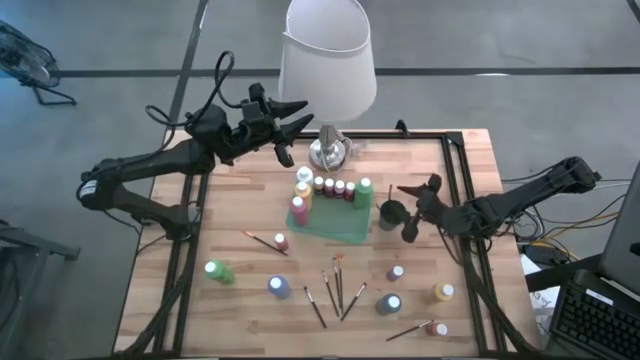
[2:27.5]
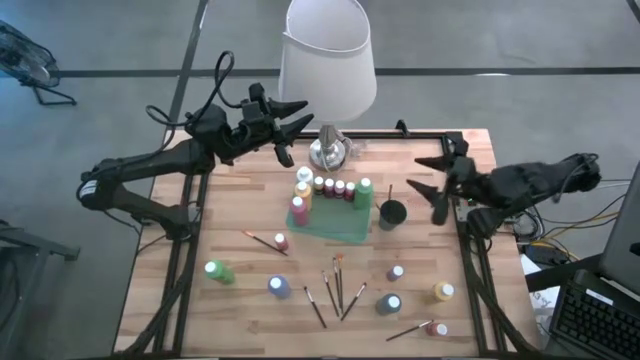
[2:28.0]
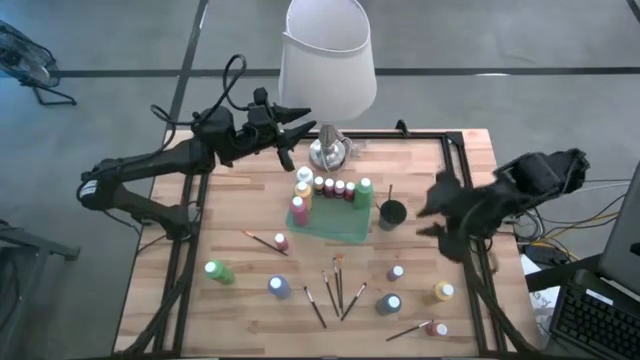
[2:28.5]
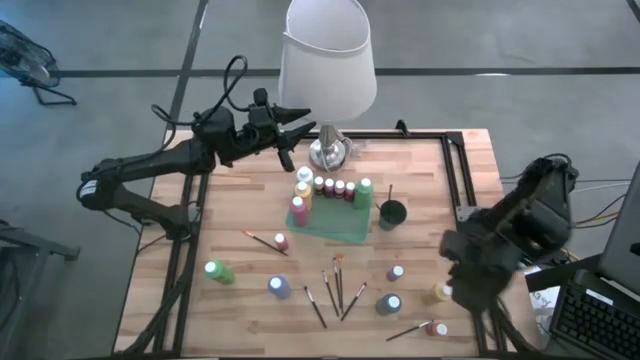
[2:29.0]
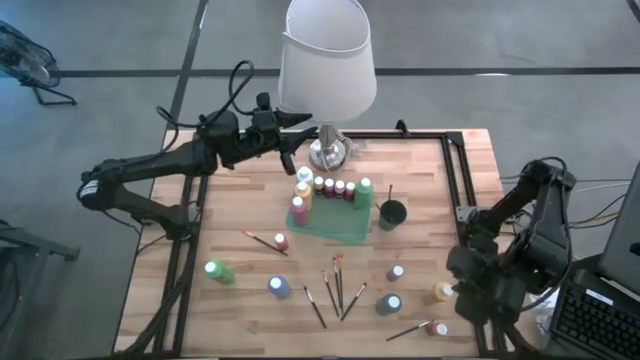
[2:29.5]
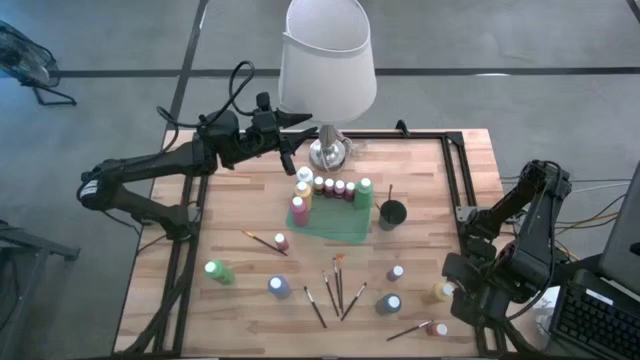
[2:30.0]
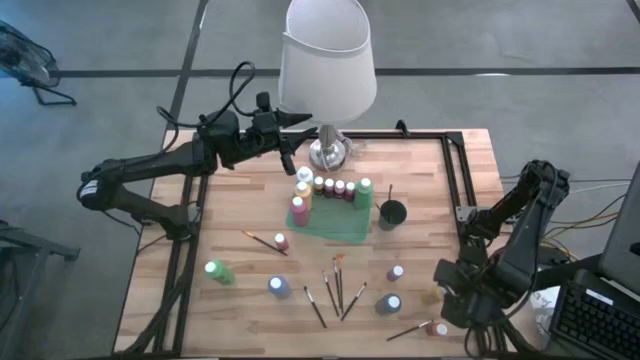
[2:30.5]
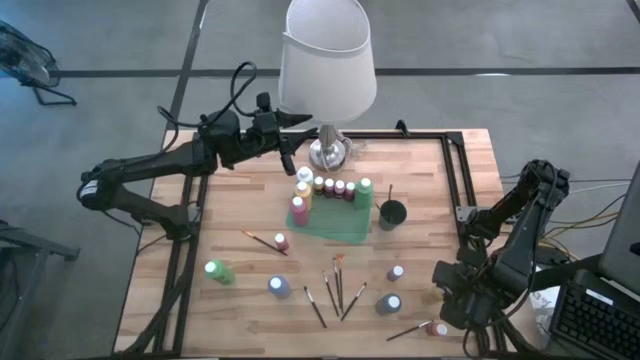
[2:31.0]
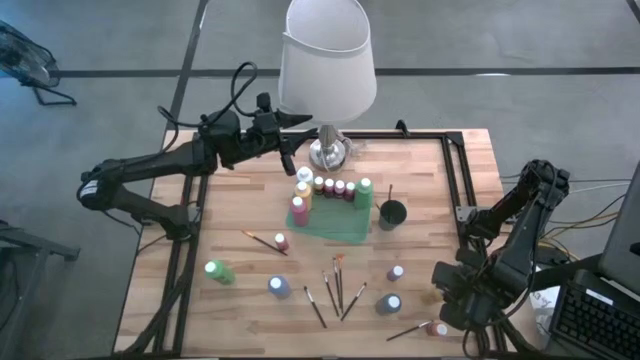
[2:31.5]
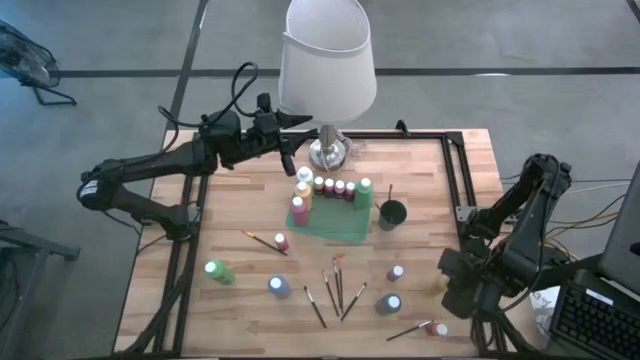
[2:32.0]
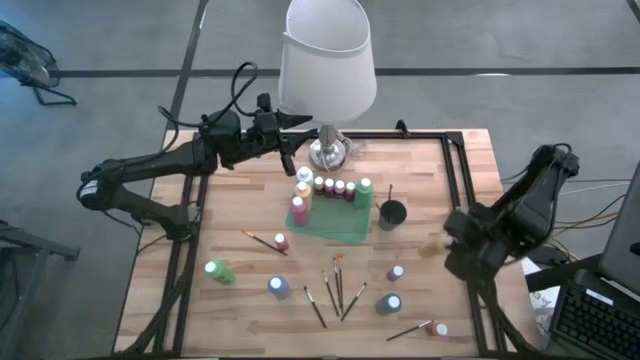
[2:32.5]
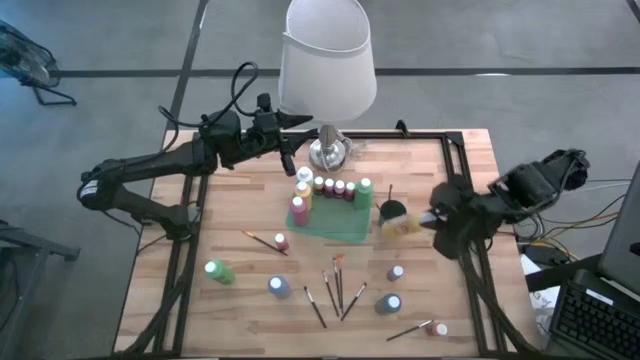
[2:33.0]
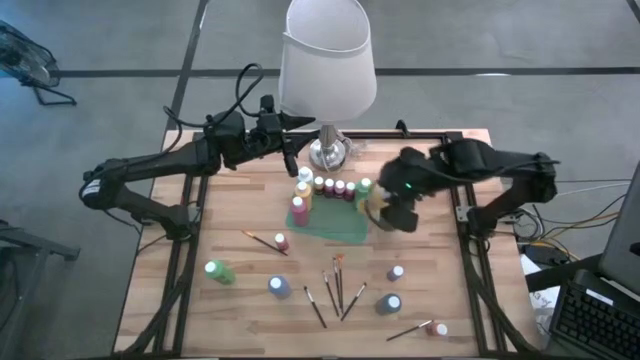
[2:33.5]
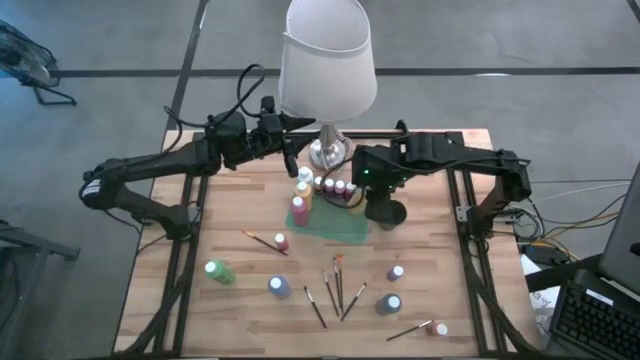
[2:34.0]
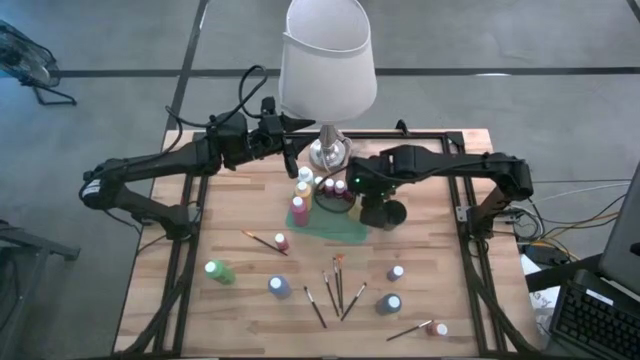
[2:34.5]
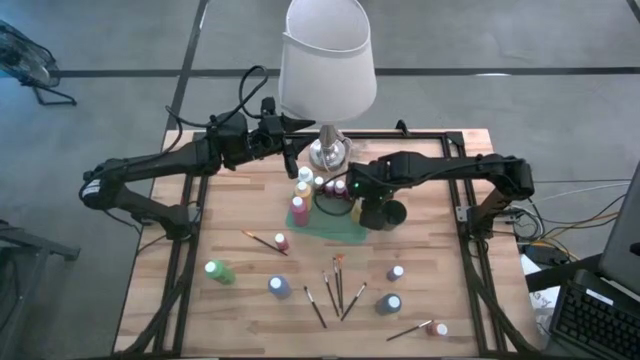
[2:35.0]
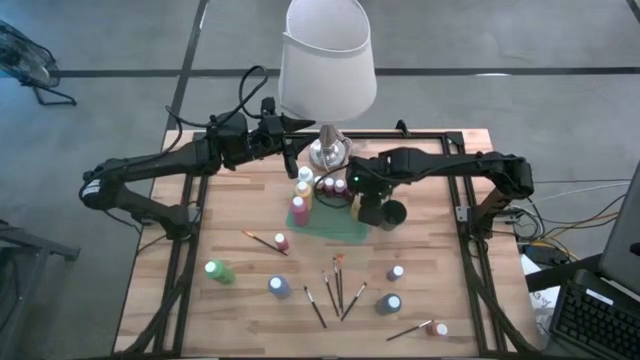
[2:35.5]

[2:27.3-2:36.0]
Task: Pick & Place Paint Supplies
Put the yellow paint bottle into the green bin

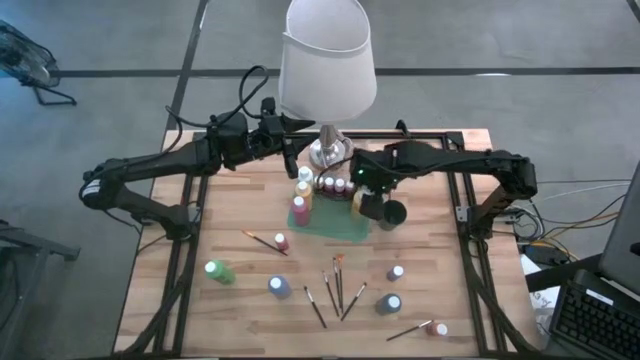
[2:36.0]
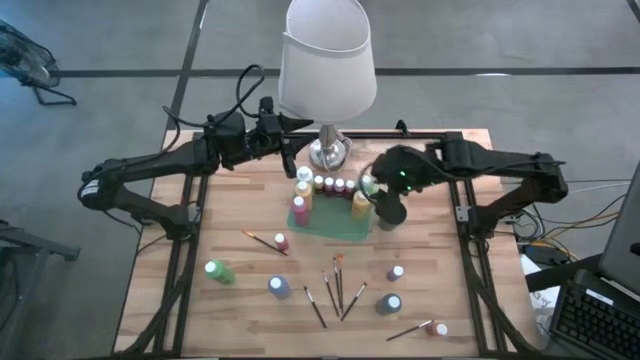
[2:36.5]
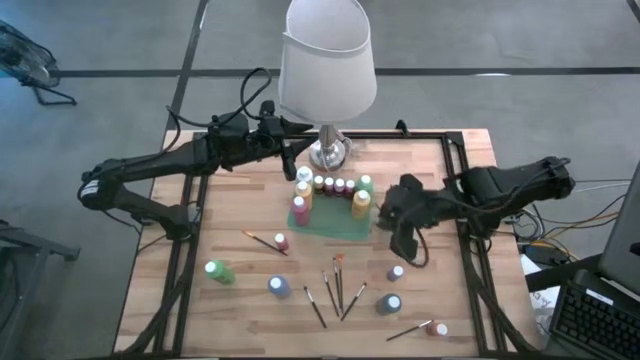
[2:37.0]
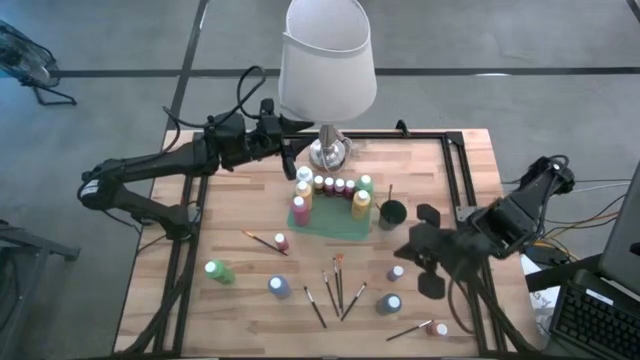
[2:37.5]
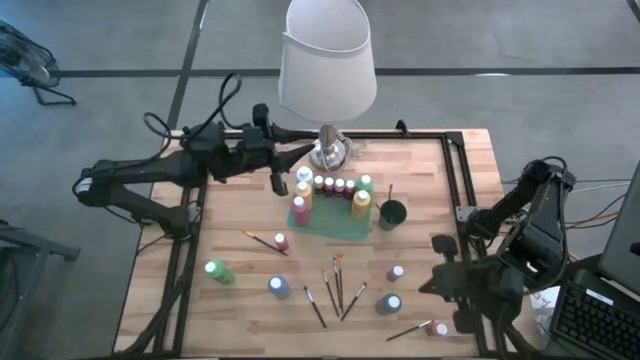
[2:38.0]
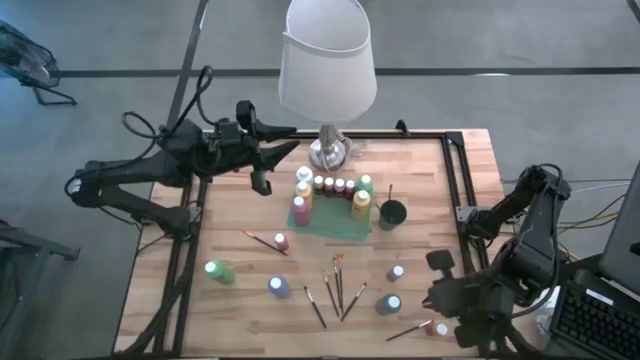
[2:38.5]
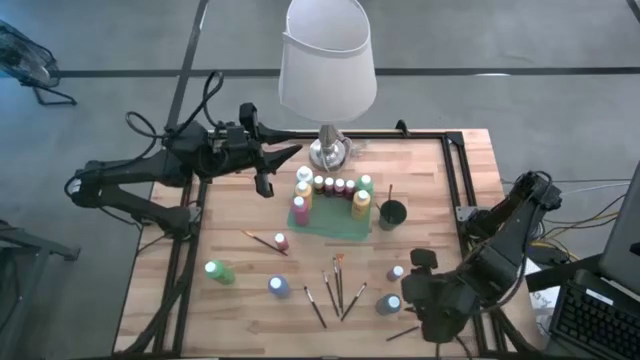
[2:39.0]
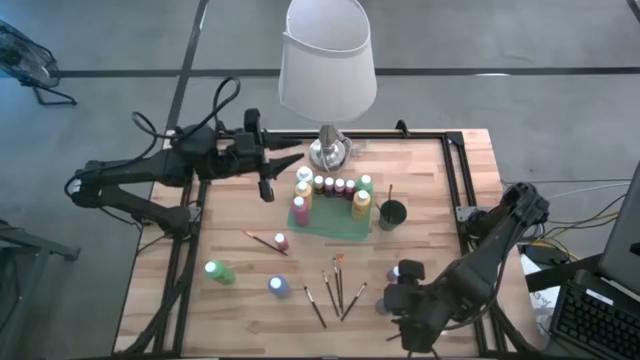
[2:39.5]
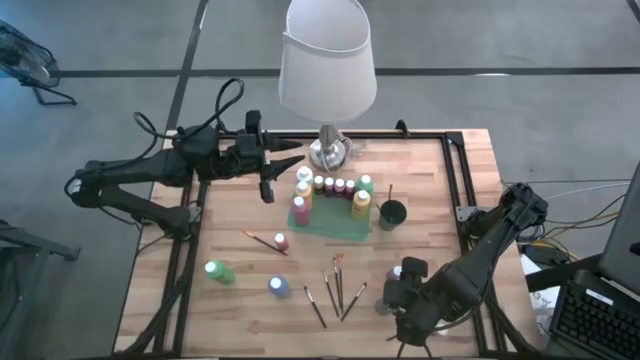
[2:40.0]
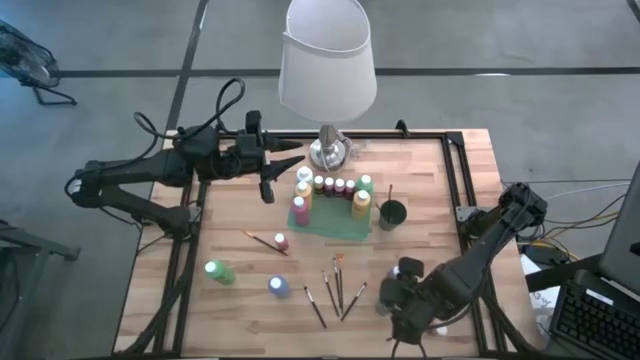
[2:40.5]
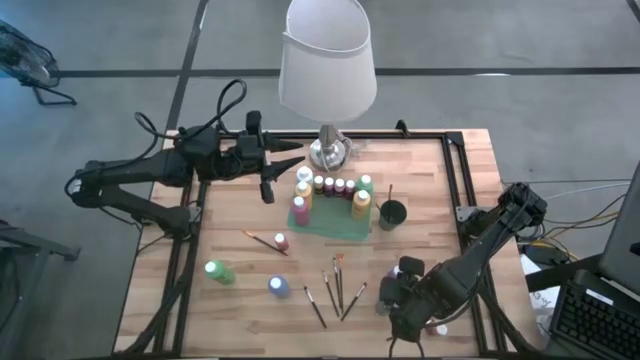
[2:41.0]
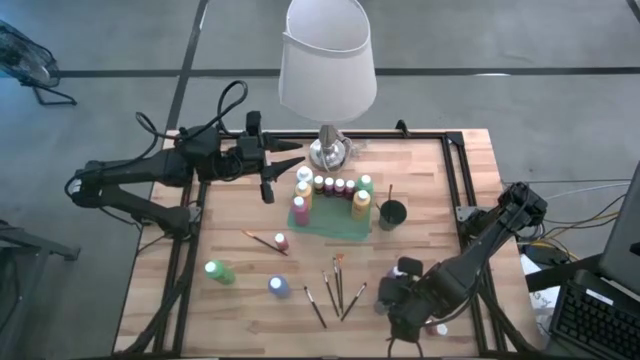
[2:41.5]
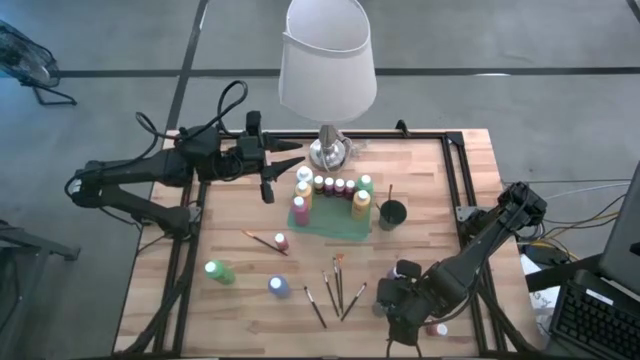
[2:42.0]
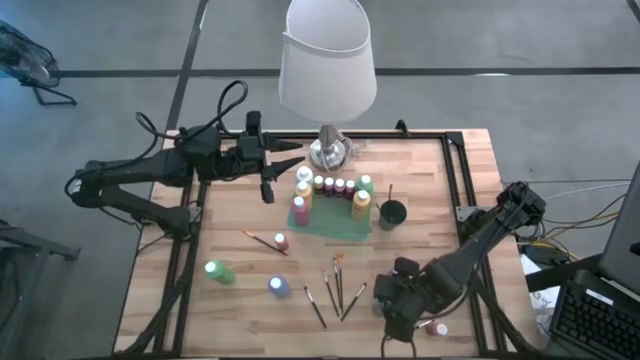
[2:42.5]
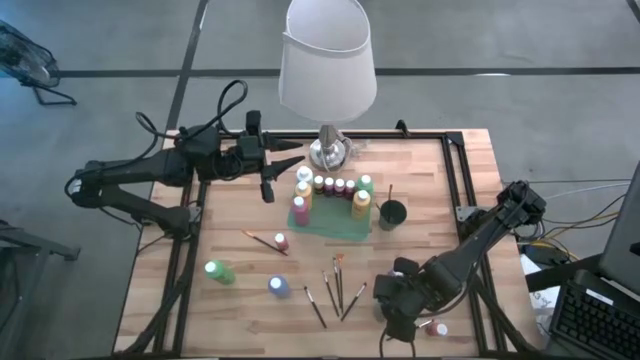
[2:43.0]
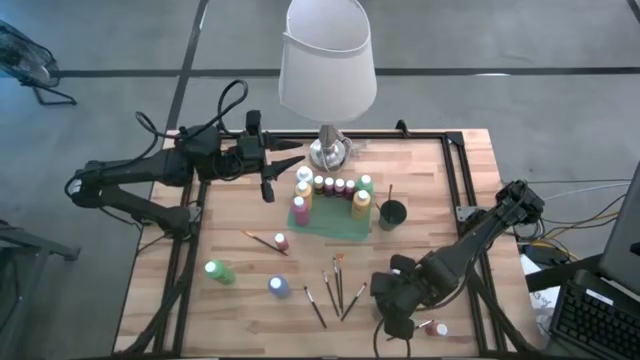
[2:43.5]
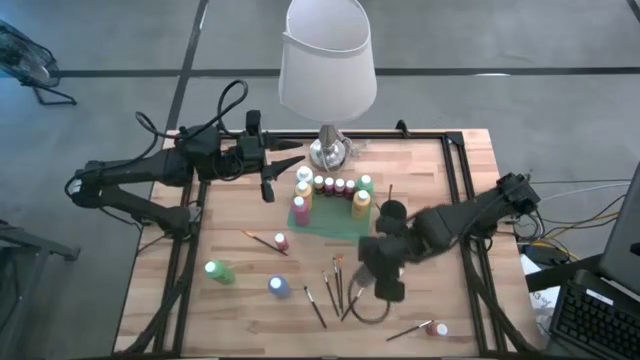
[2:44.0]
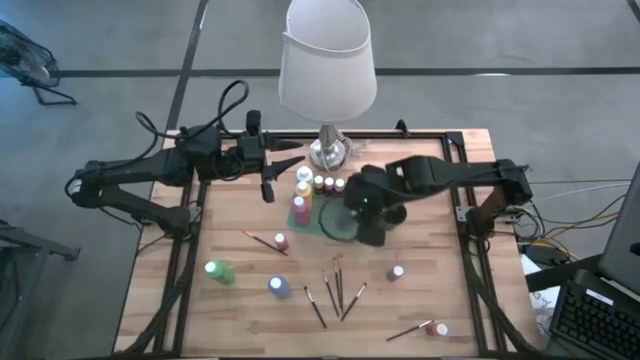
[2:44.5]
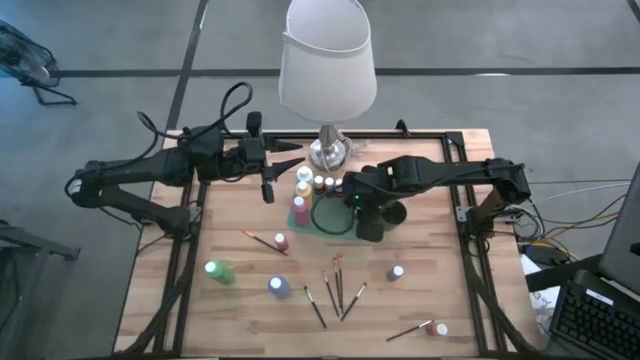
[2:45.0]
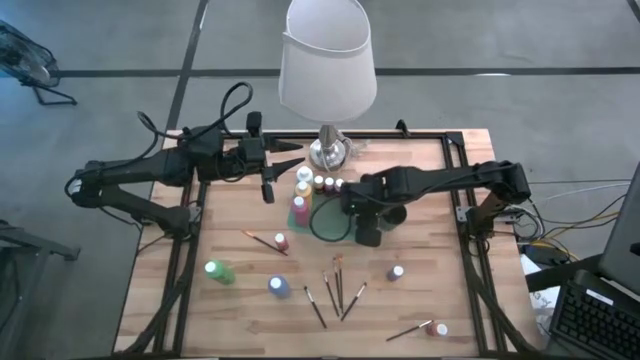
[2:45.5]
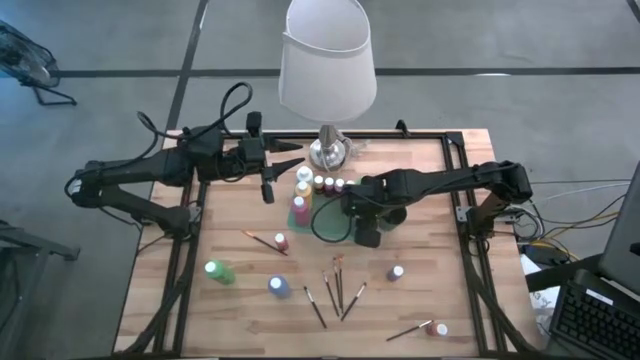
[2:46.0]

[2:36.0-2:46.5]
Put the blue paint bottle into the green bin

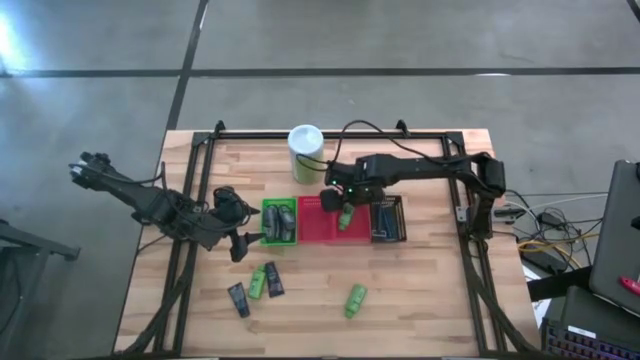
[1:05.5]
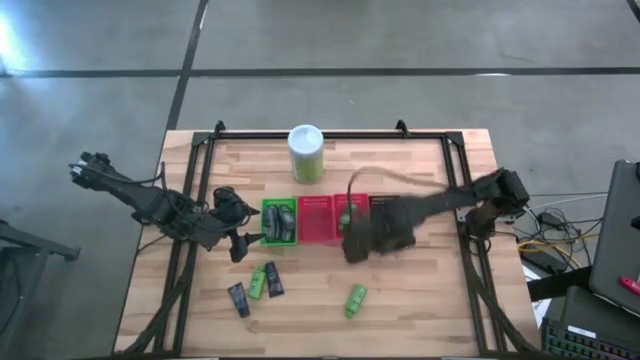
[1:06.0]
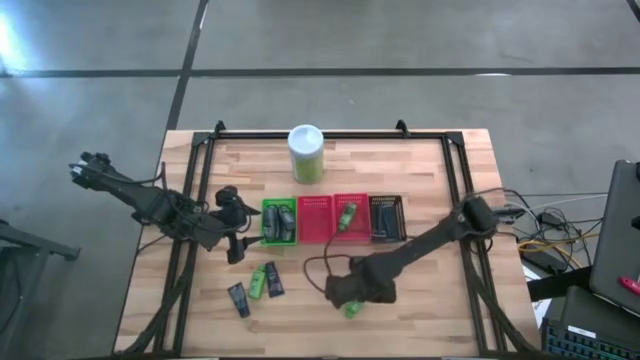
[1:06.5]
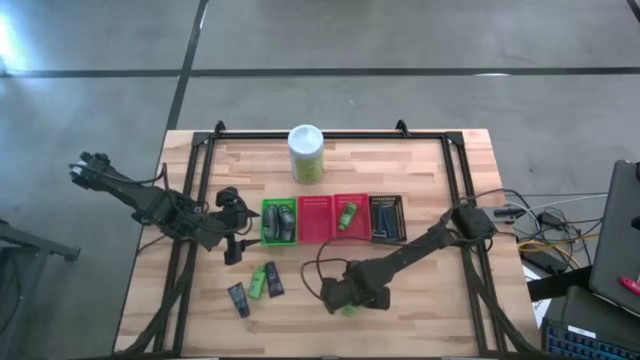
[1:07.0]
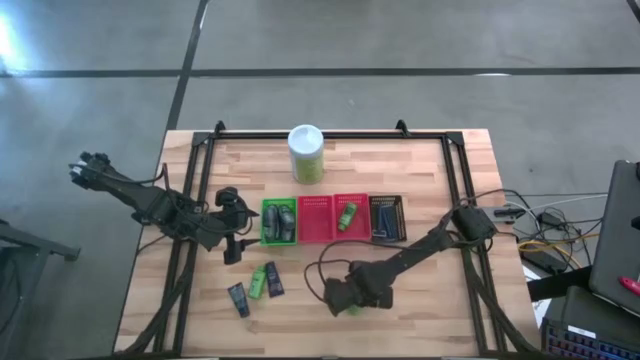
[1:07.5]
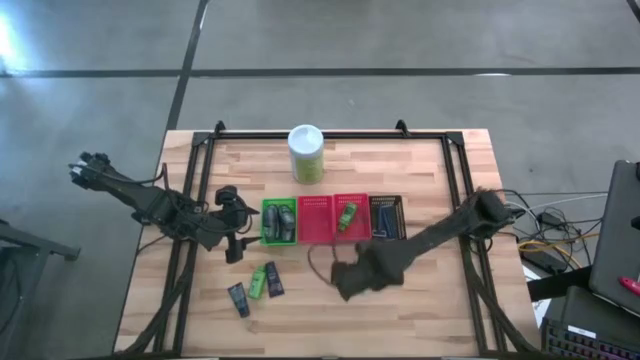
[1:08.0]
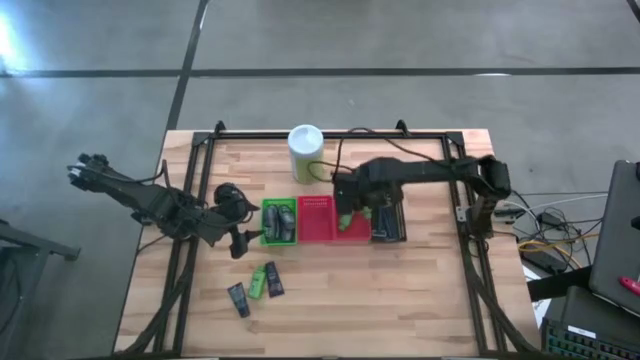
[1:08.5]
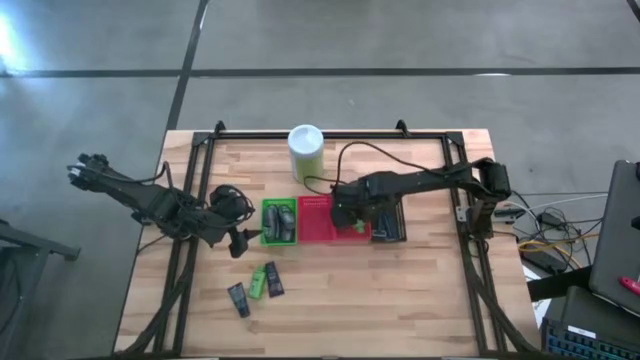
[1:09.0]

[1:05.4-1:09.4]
Task: Pick & Place Travel size toiletries
Put the green shampoo bottle into the right red bin
